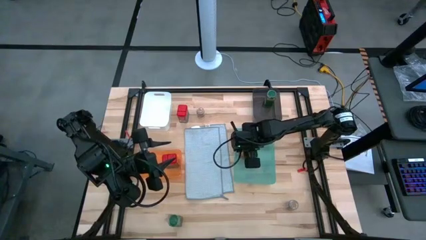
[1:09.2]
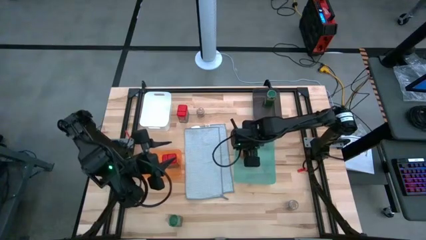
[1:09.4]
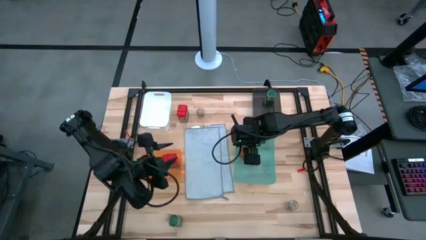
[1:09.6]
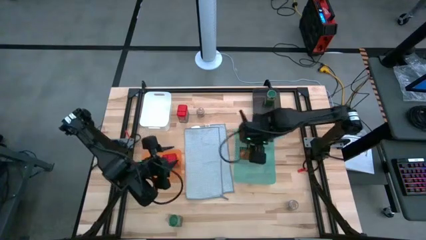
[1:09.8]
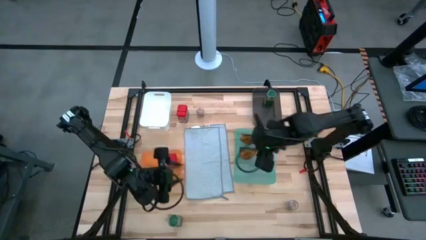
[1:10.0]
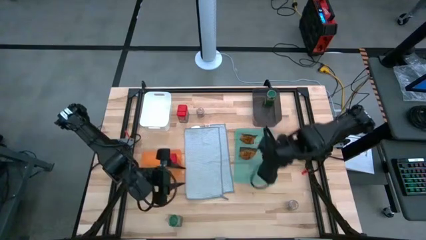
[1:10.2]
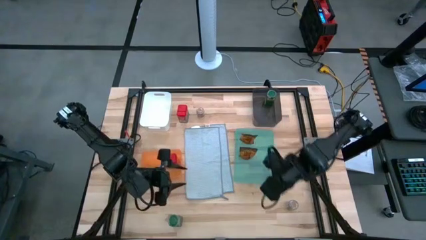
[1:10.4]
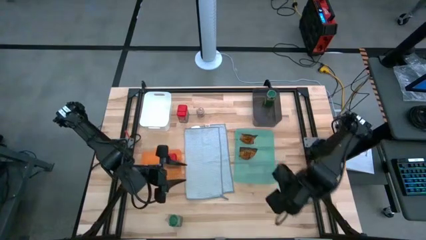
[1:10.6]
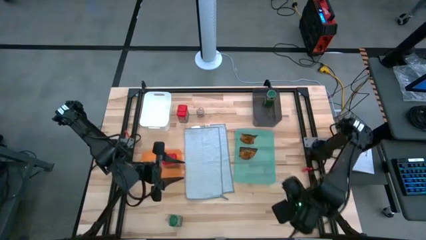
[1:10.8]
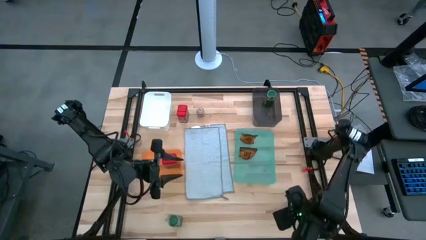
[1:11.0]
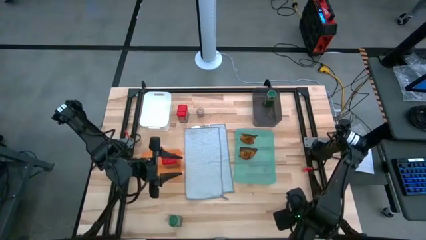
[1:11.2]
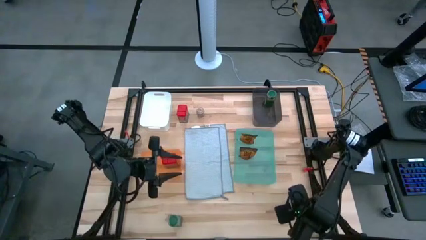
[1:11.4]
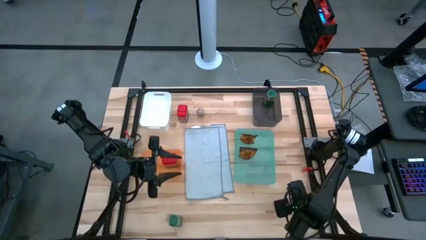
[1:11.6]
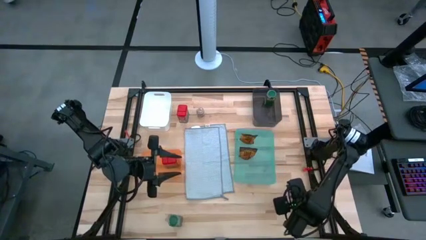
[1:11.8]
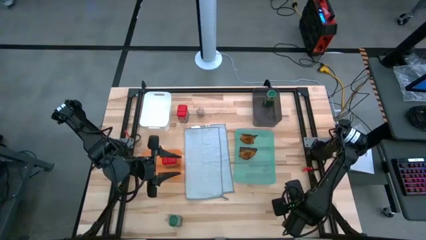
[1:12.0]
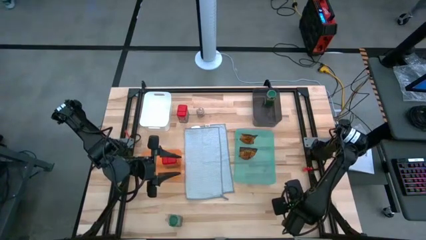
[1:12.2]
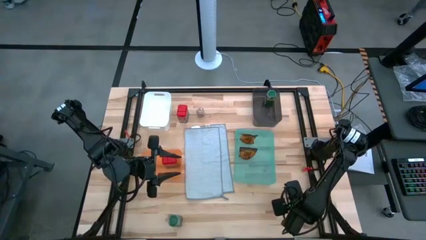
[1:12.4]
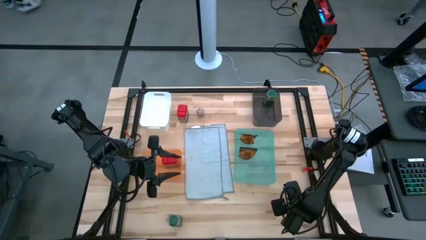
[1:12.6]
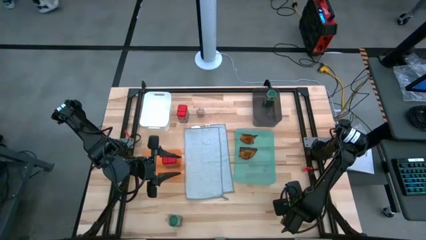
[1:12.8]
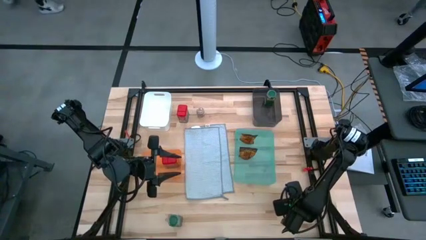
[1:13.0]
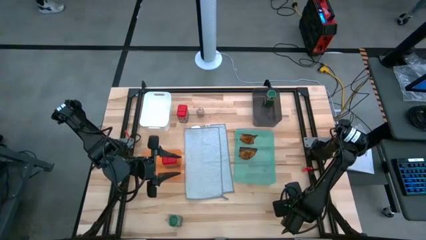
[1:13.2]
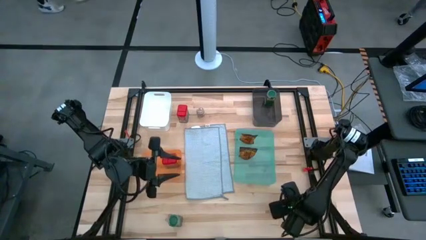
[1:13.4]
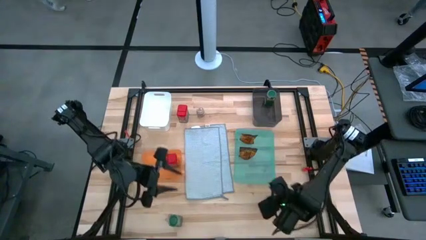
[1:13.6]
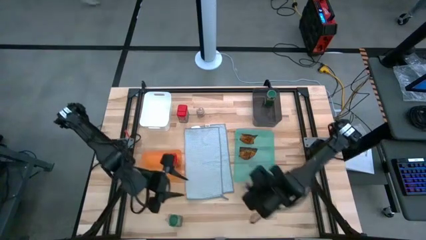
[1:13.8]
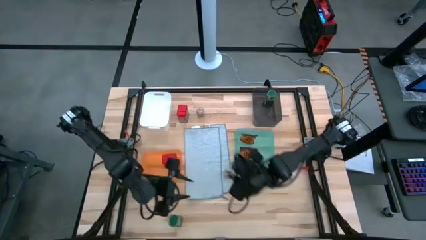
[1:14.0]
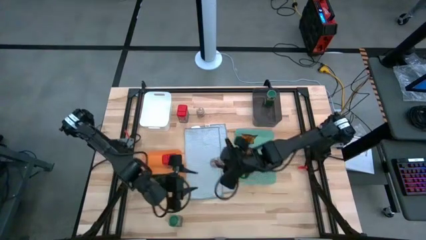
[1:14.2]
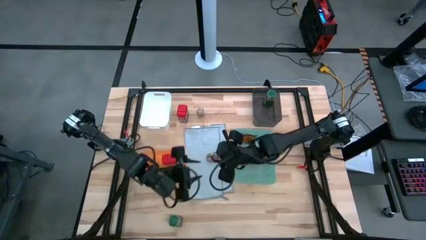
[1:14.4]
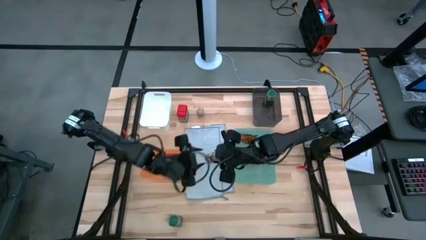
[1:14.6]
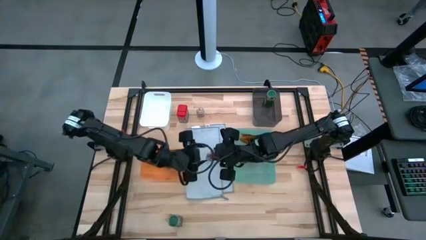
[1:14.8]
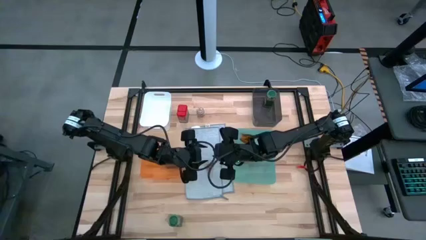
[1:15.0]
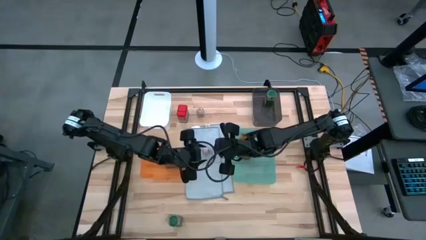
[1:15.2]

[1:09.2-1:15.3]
Task: Sort spices by type
Put the bottom brown seasoning bottle into the white bin

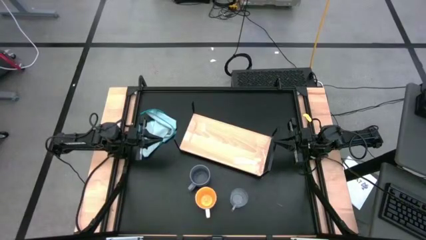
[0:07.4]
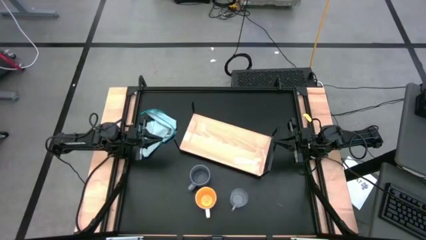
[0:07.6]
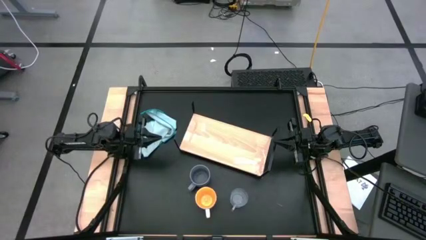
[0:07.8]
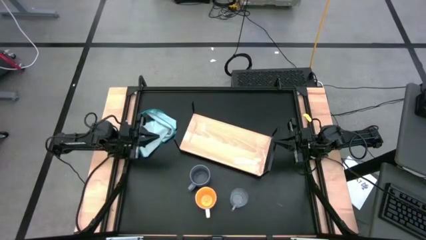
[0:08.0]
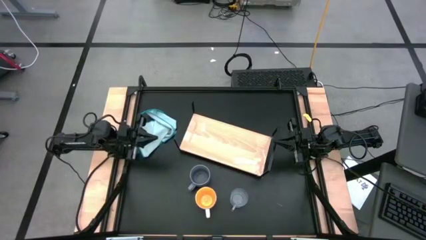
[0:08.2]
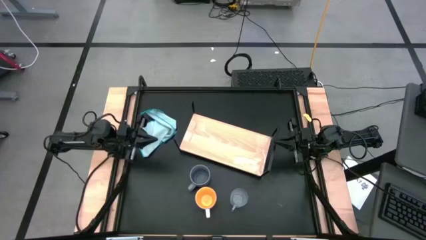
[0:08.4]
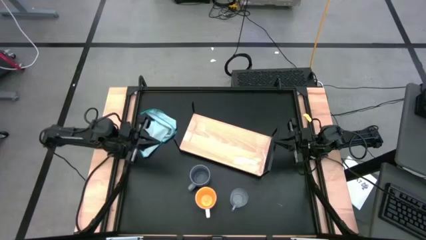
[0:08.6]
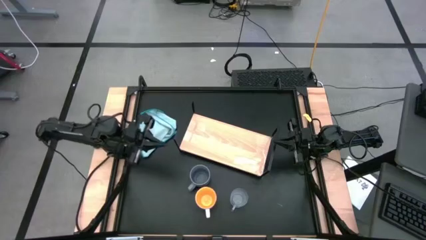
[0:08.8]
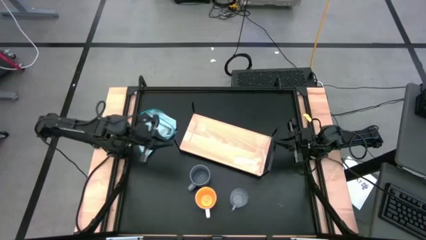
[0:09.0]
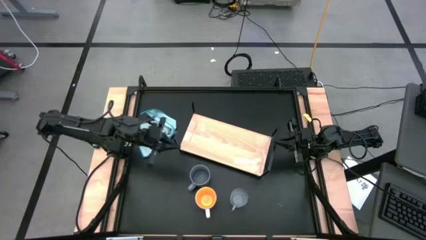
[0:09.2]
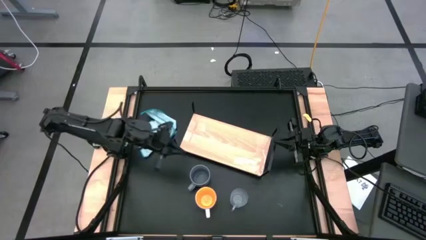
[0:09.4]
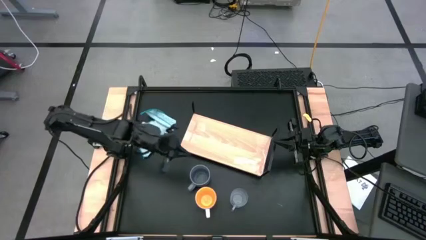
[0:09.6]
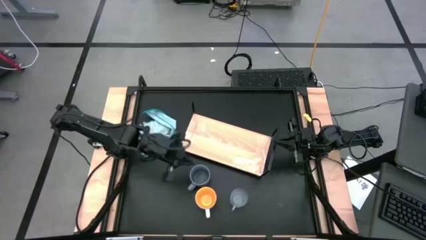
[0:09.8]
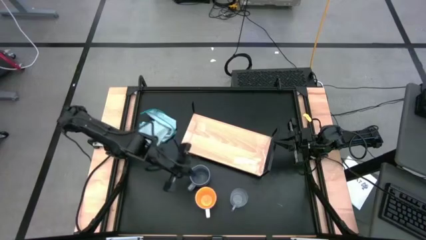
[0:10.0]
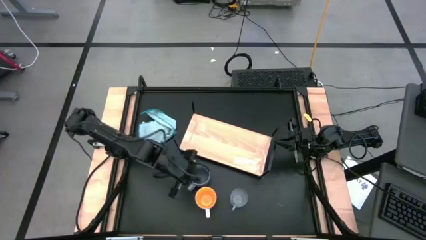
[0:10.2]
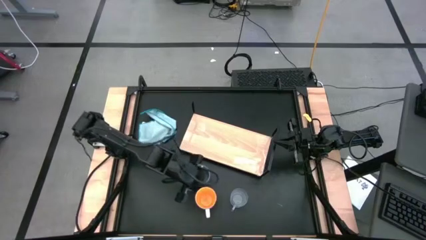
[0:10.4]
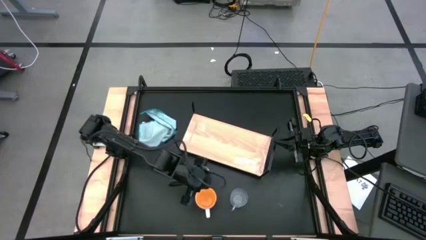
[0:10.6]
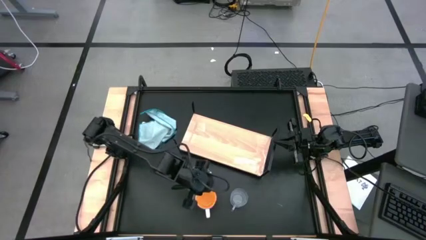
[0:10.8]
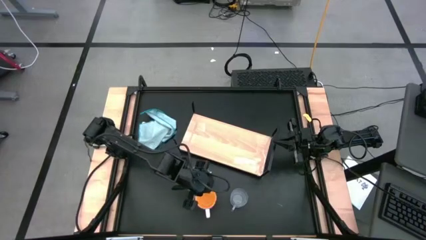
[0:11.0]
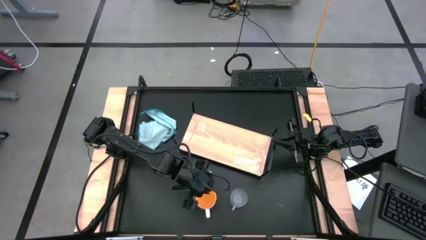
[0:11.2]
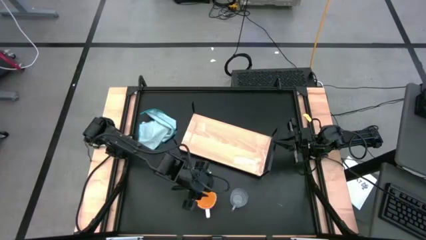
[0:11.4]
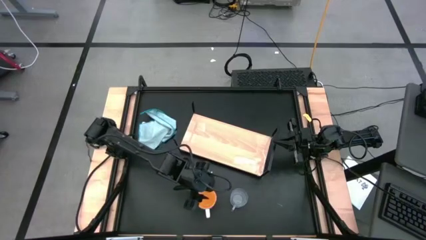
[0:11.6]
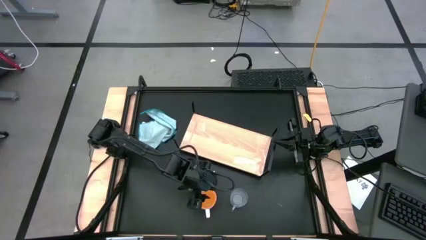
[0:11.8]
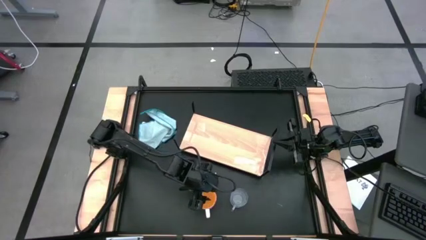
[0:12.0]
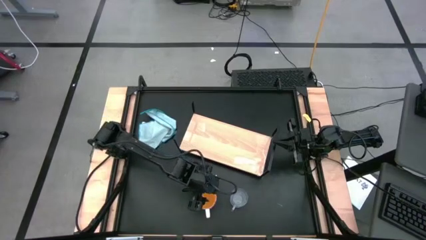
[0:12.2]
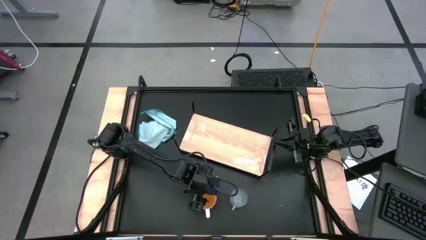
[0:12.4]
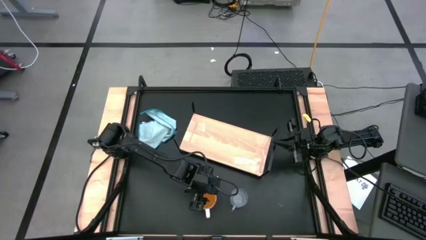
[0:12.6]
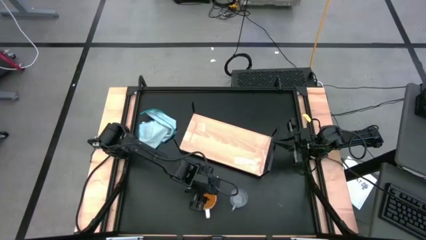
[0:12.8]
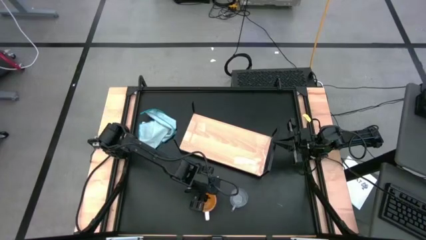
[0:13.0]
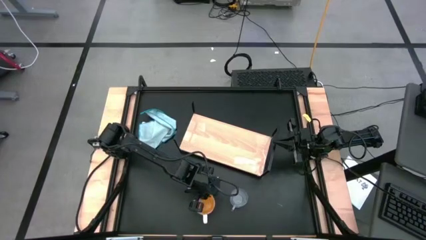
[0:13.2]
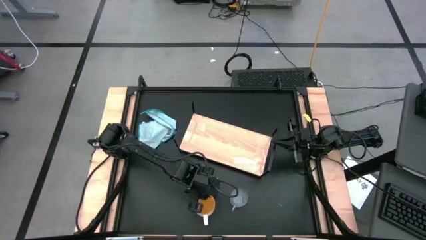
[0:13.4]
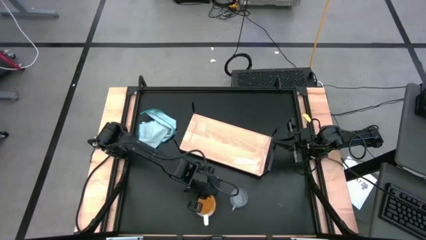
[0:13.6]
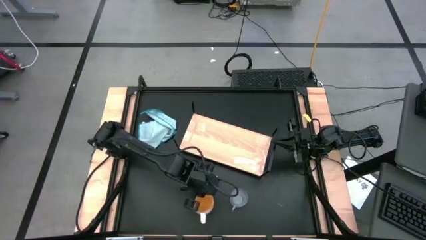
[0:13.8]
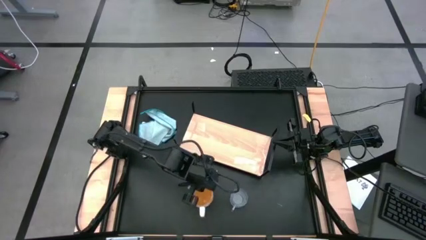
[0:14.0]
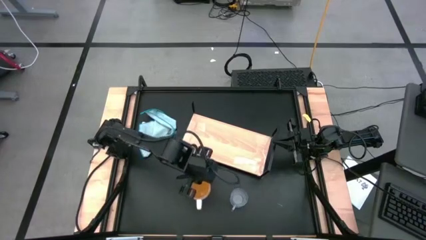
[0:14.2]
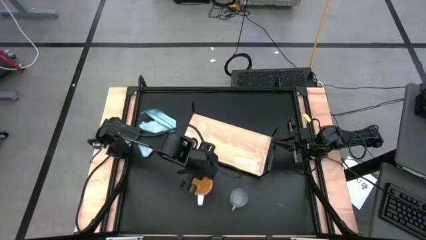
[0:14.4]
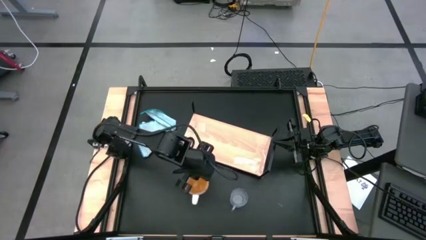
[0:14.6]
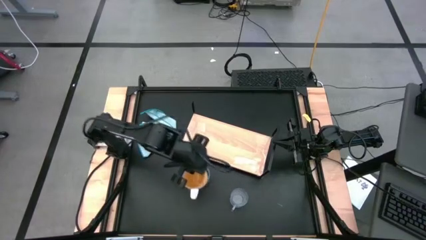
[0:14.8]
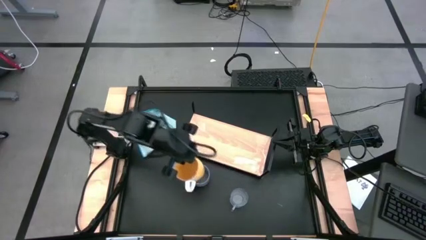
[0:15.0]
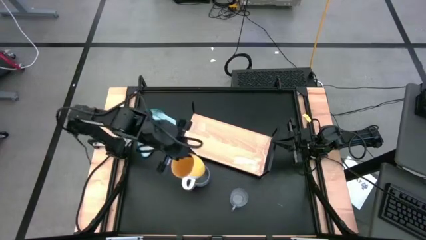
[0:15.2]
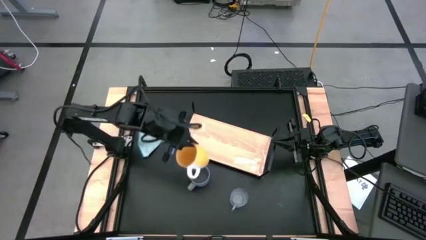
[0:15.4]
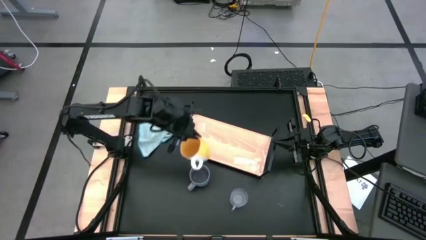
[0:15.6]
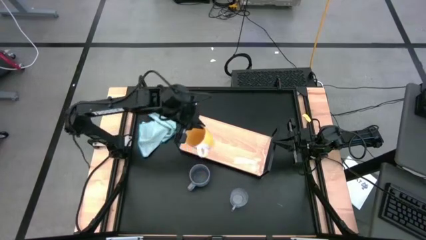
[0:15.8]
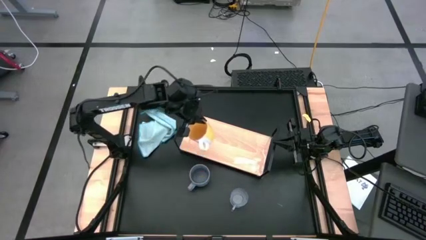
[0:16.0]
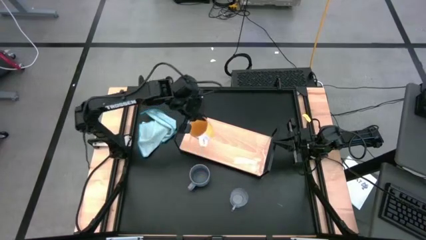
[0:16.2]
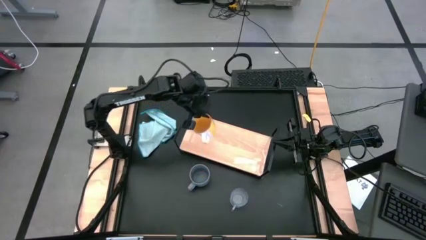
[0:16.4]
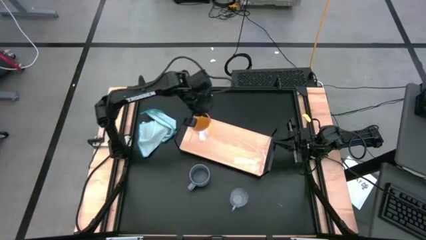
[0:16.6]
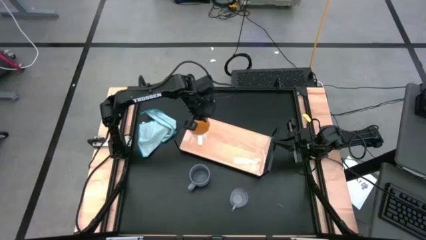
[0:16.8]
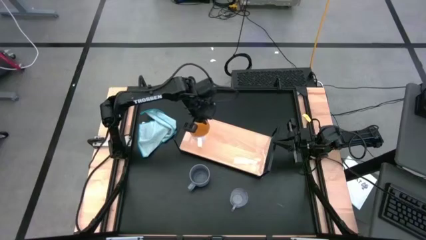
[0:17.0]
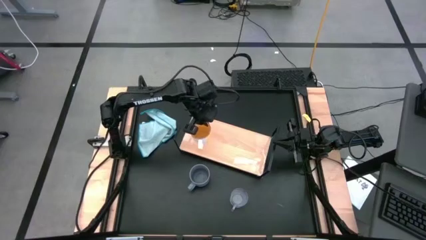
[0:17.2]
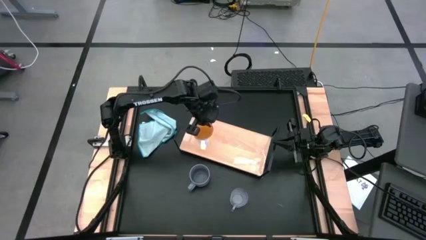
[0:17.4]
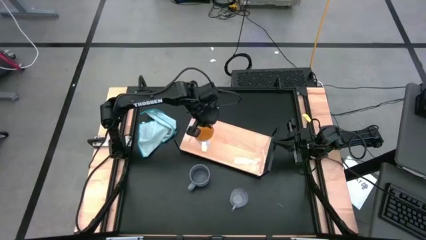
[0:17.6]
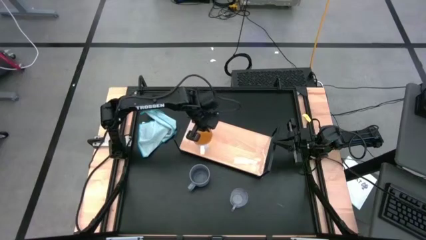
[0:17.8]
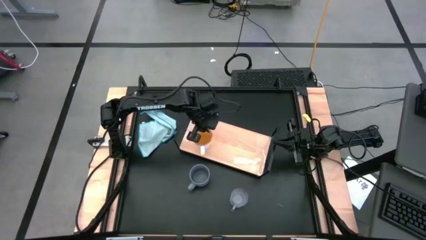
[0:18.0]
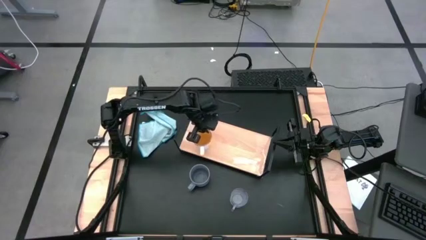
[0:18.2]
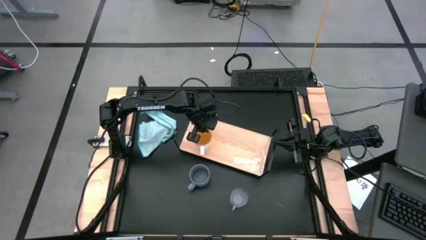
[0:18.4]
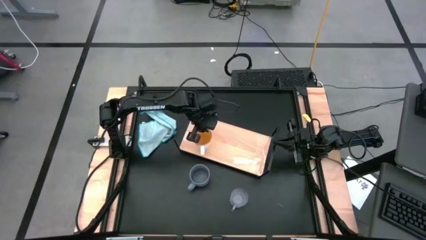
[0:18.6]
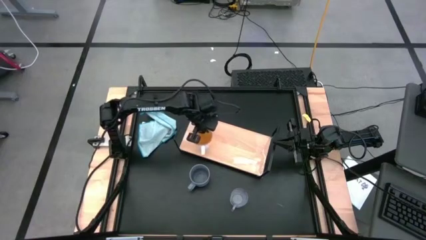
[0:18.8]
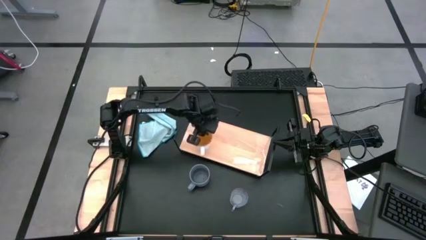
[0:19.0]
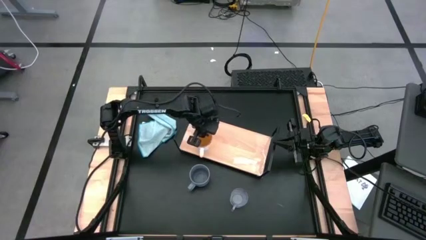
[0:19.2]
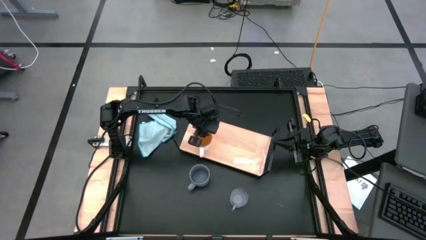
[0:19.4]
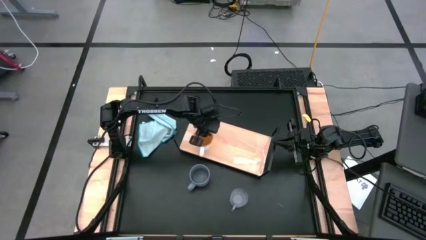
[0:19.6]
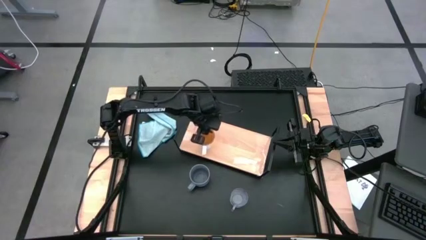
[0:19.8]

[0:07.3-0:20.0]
Task: Stack small to large cups/mugs on shelf
Put the yellow cup on the shelf
